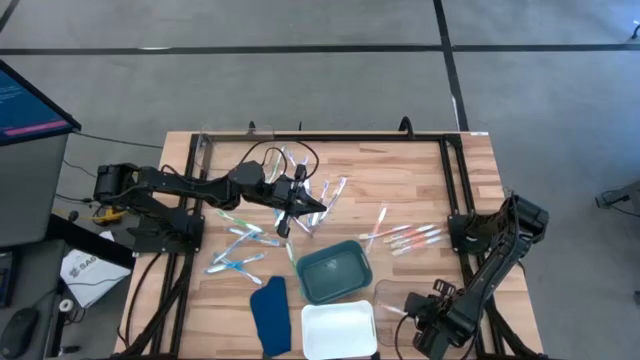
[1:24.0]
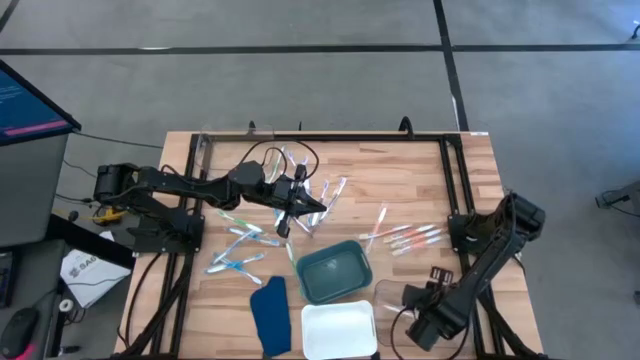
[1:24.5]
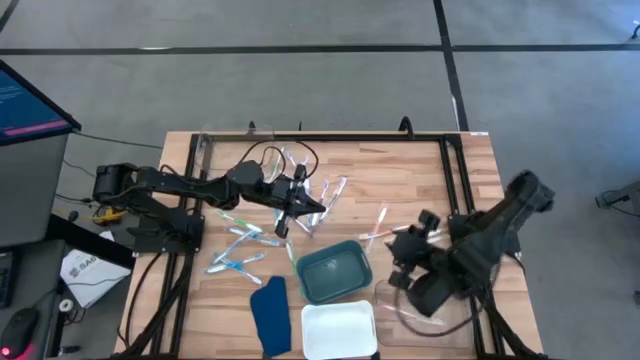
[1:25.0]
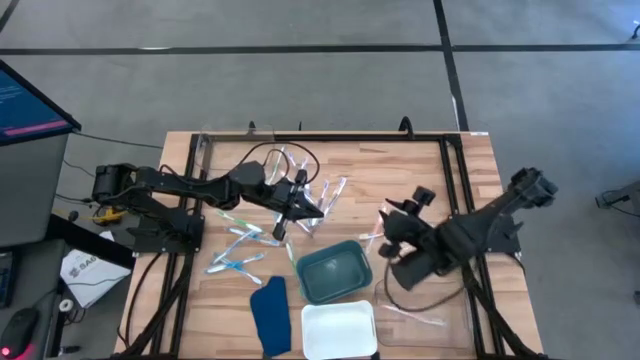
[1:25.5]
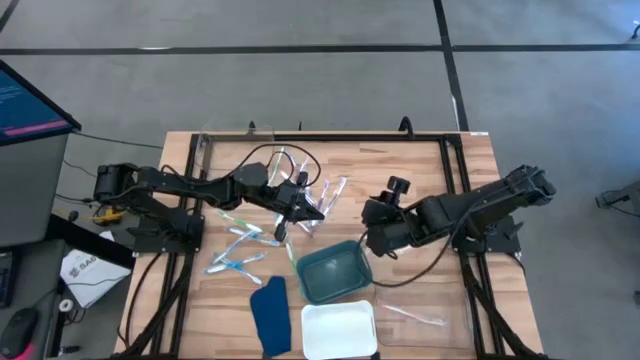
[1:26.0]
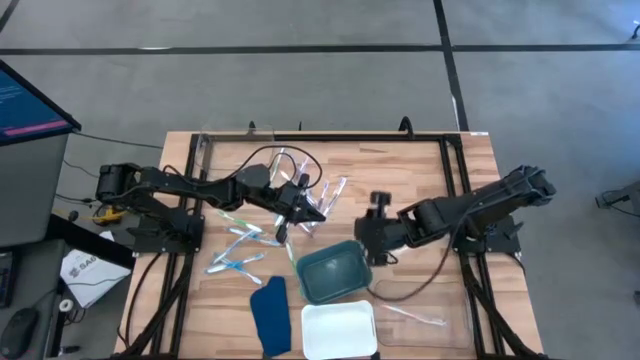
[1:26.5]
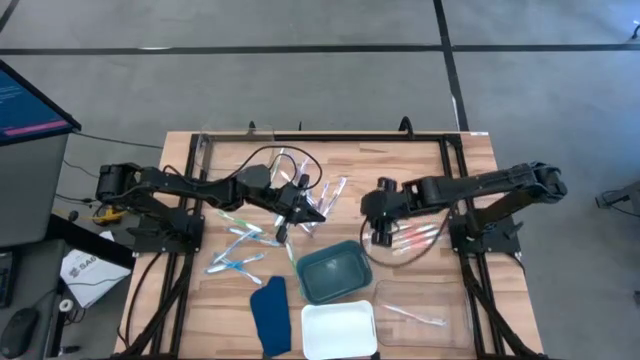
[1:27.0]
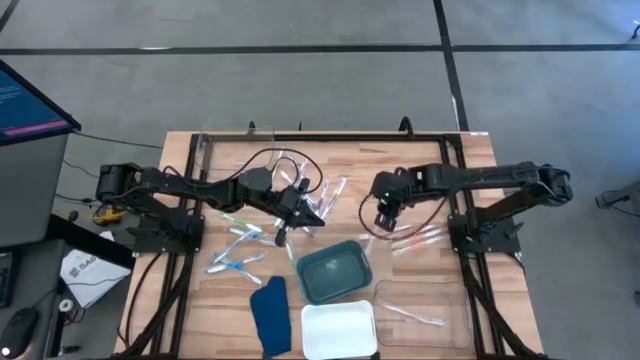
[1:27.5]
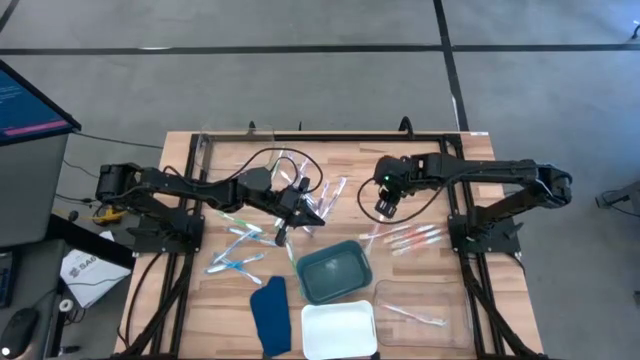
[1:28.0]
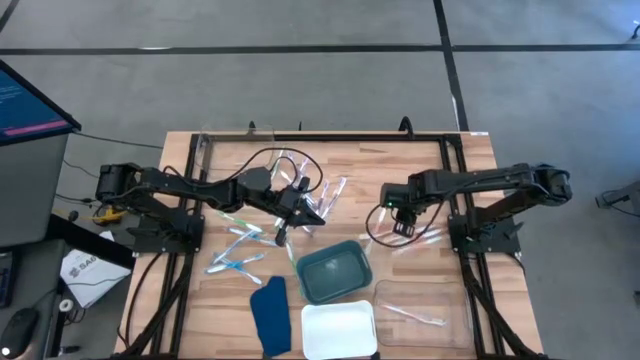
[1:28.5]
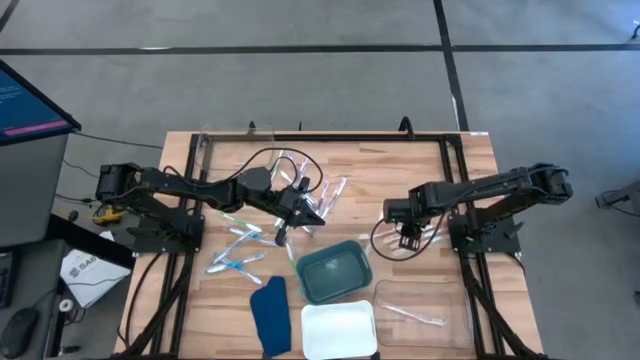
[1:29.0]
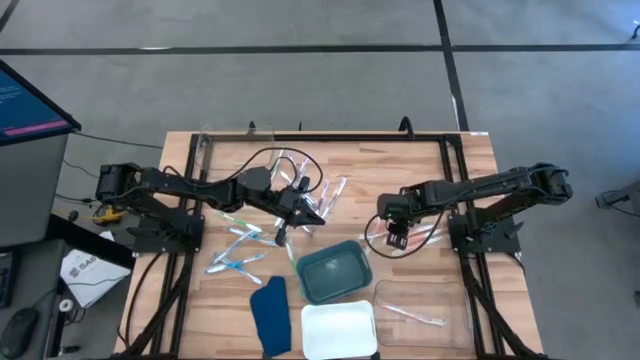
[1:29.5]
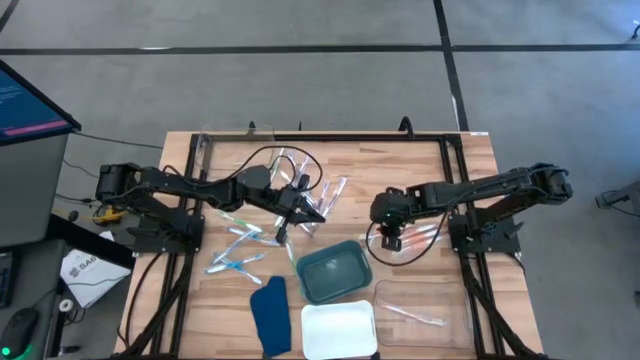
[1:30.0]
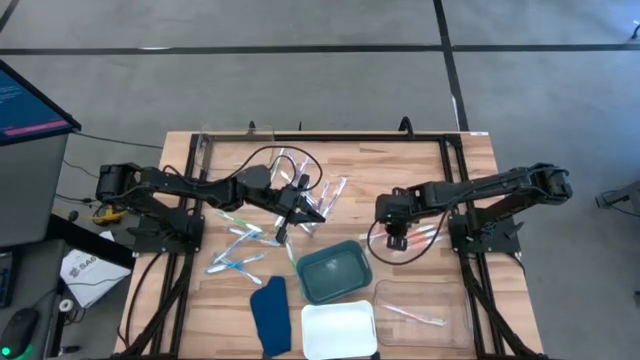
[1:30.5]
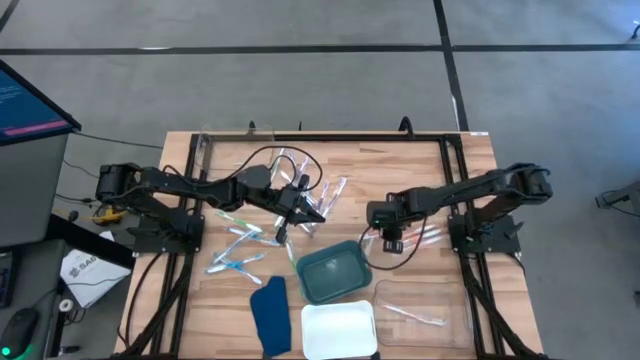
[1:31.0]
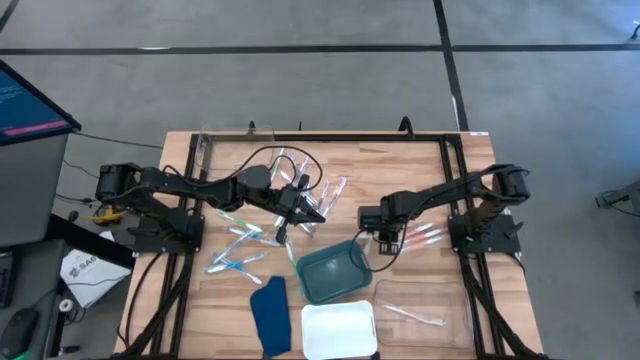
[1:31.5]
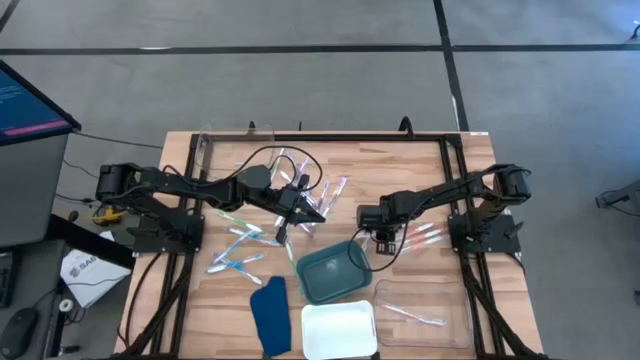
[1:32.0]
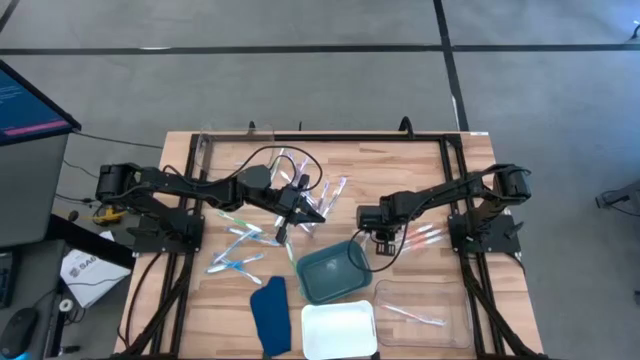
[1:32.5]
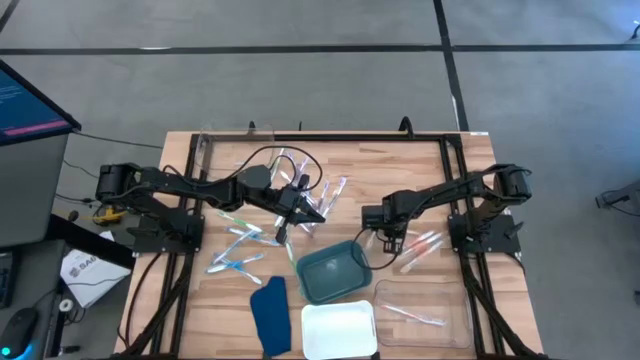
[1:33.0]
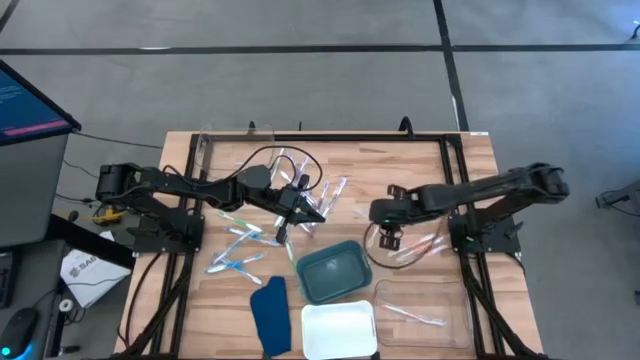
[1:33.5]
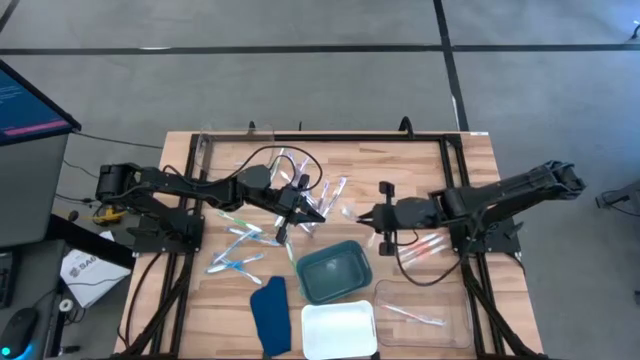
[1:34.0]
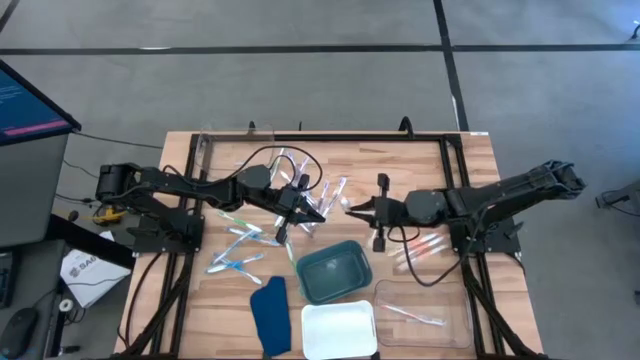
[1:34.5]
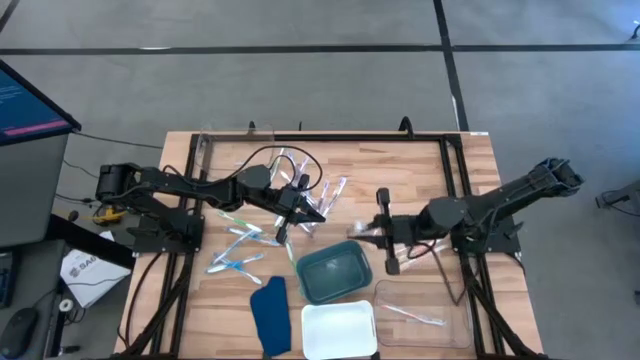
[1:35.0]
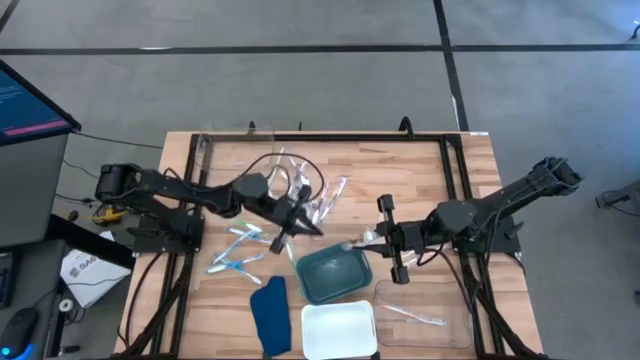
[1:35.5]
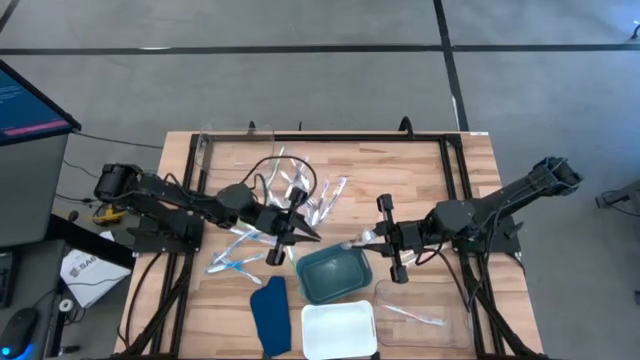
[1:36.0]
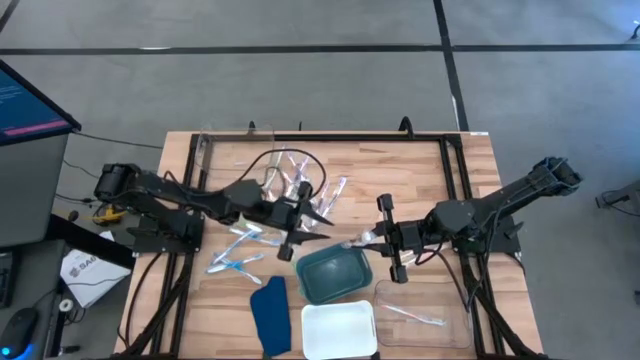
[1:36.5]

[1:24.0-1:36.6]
Task: Pick & Place Toothbrushes
Put the orange toothbrush into the bottom transparent bin

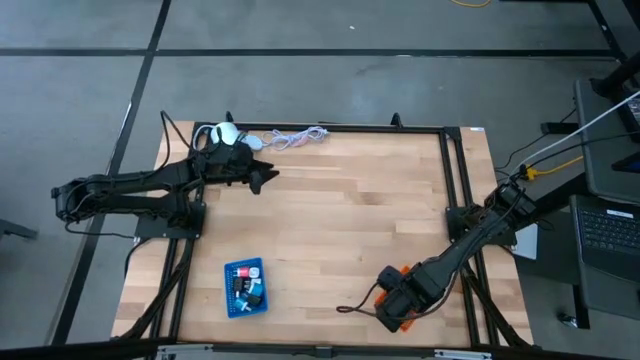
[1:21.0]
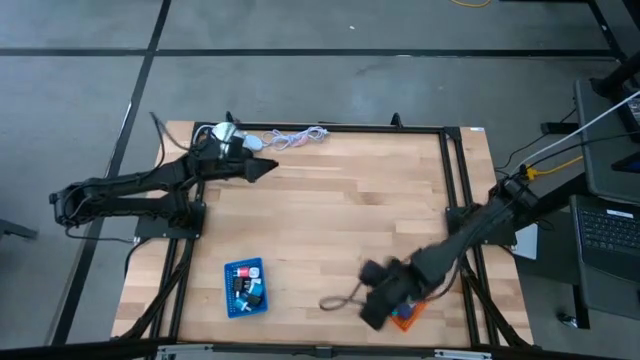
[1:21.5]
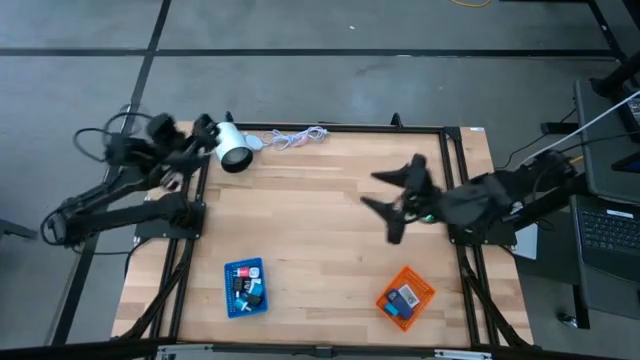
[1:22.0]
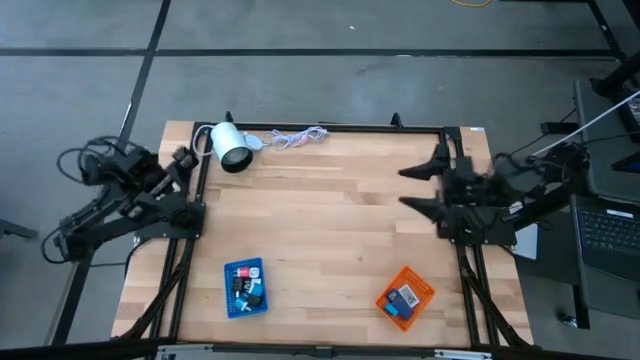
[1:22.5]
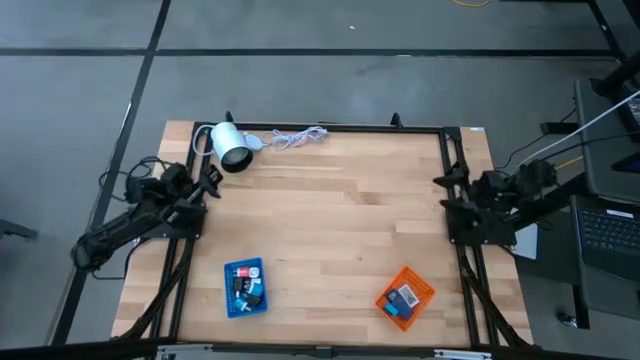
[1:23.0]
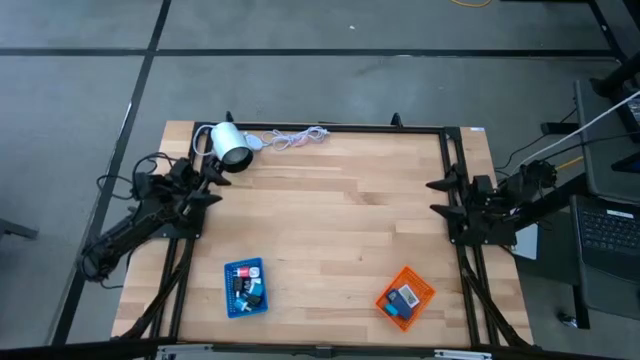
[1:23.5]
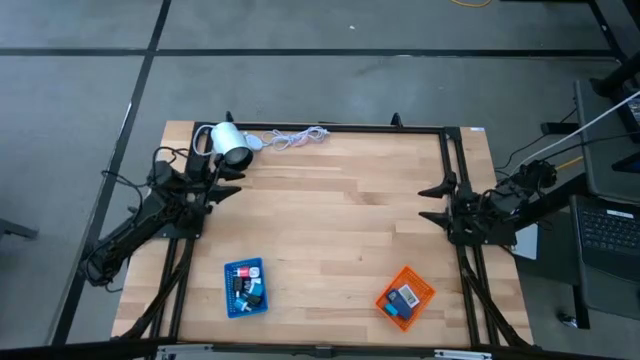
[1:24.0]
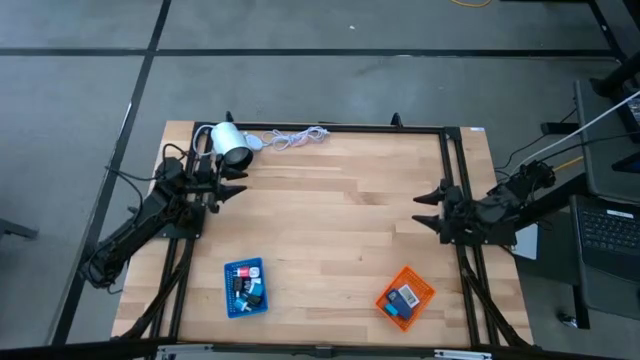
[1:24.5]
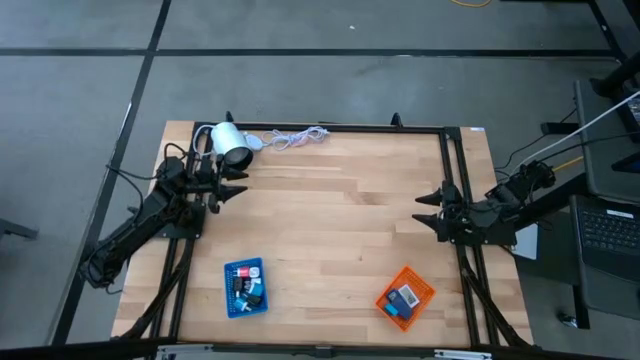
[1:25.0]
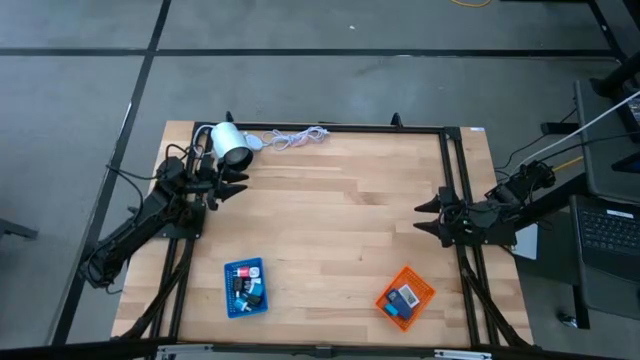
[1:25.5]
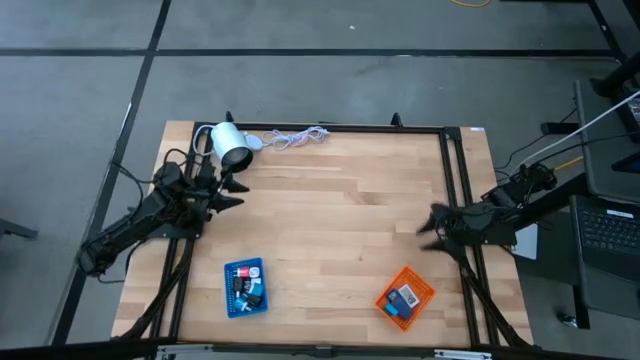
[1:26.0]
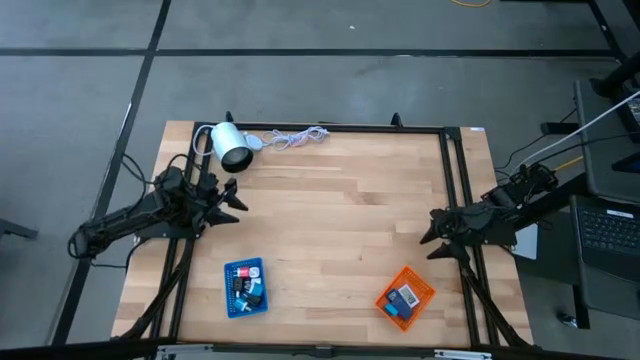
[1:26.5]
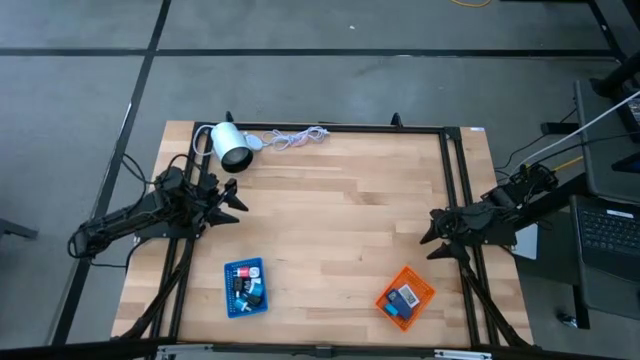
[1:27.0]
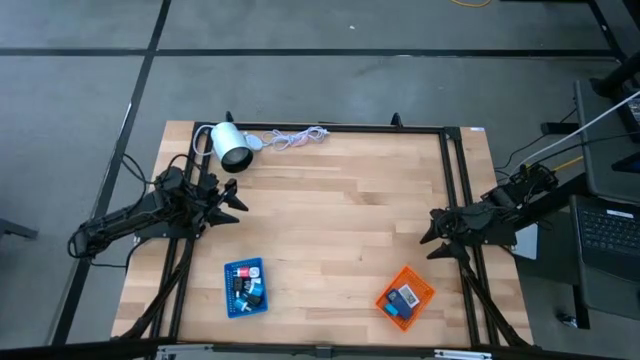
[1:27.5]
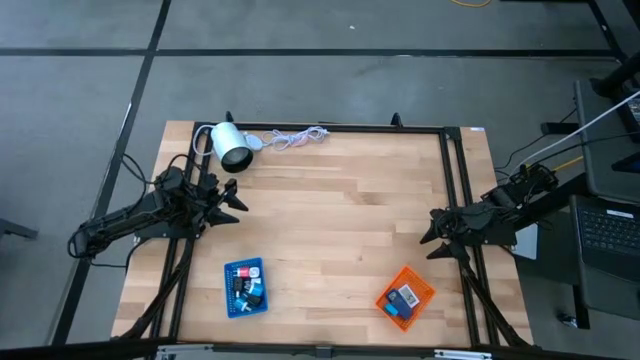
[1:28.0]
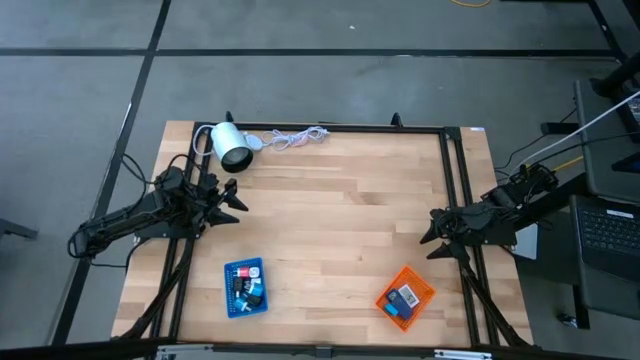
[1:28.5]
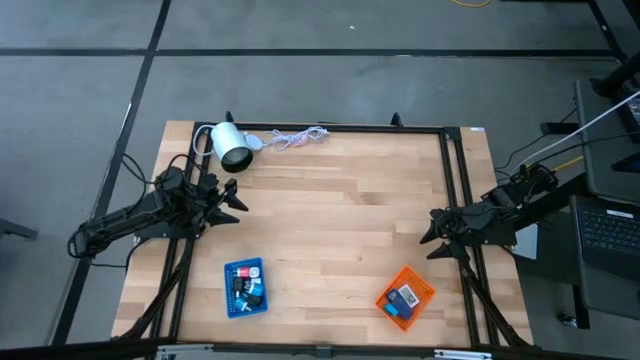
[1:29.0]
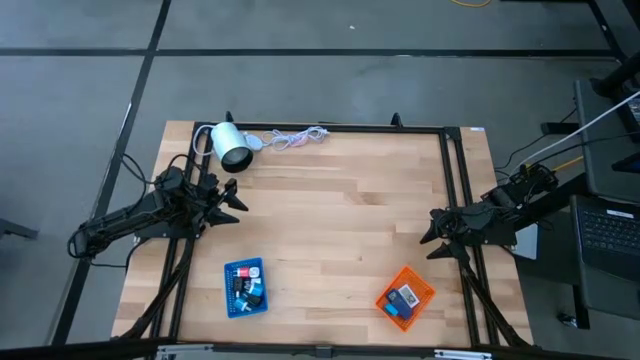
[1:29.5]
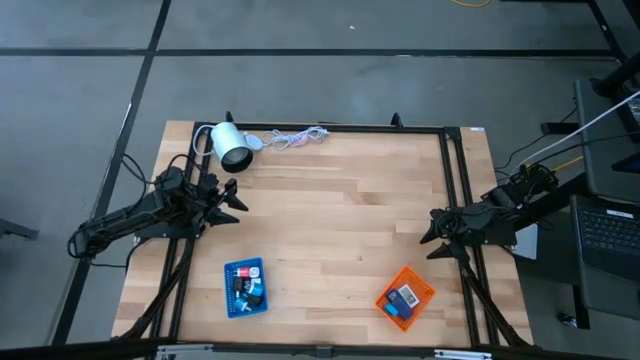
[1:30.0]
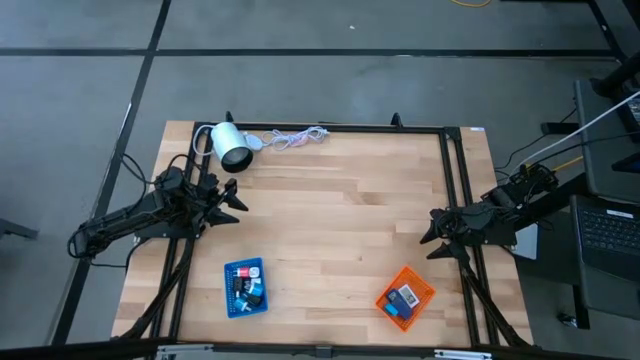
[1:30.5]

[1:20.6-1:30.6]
Task: Pick & Place Office items
Return to home position
